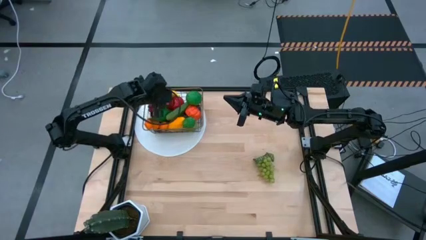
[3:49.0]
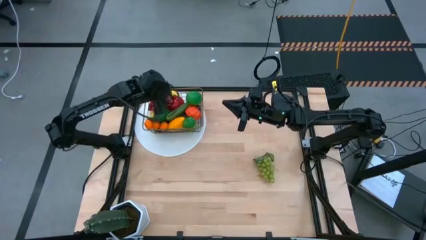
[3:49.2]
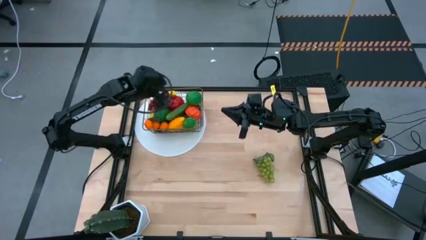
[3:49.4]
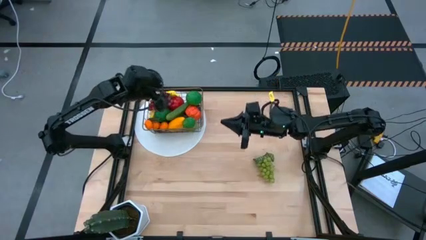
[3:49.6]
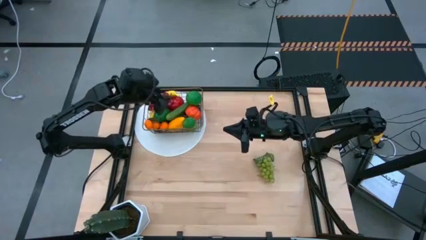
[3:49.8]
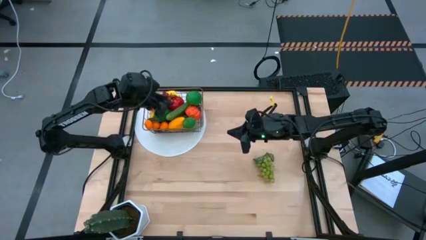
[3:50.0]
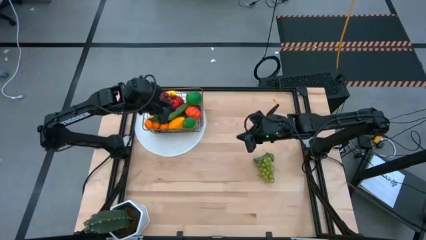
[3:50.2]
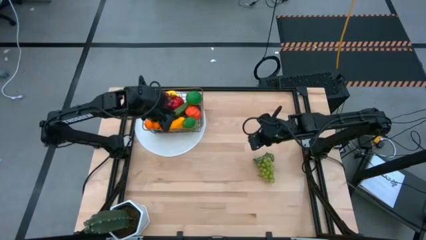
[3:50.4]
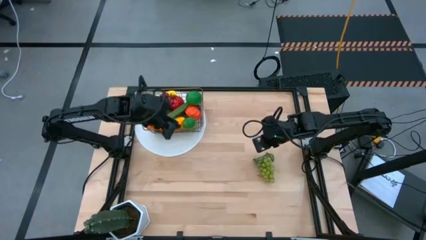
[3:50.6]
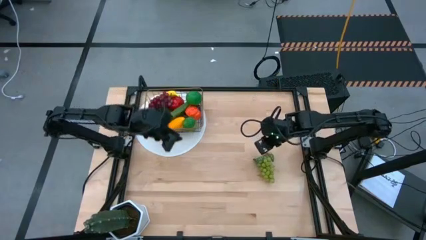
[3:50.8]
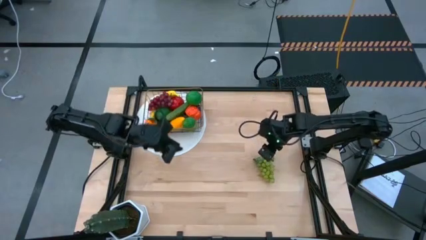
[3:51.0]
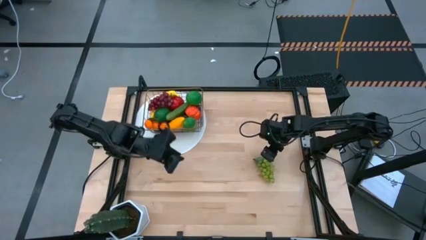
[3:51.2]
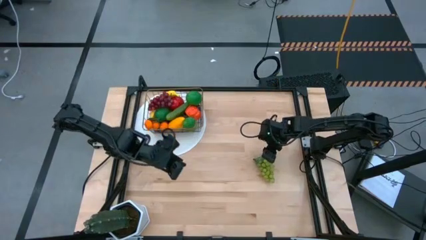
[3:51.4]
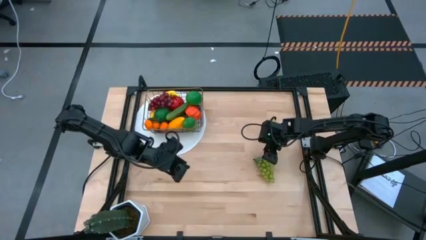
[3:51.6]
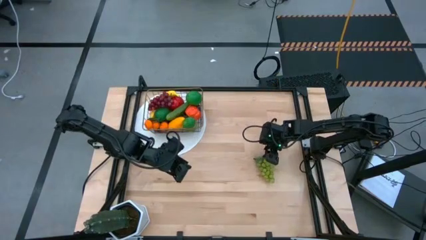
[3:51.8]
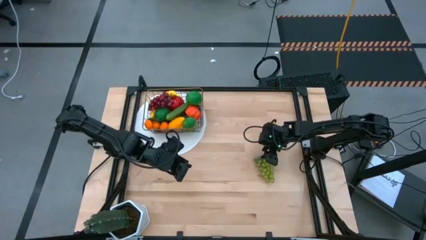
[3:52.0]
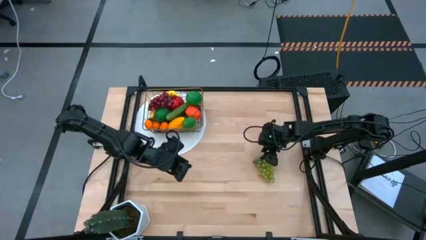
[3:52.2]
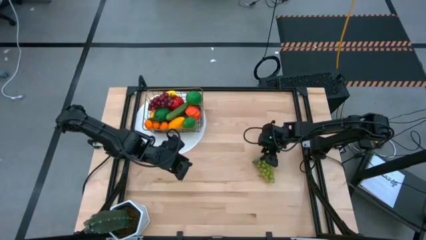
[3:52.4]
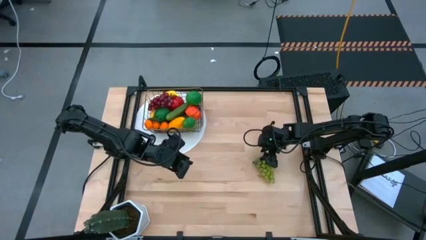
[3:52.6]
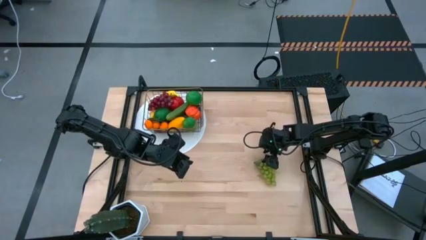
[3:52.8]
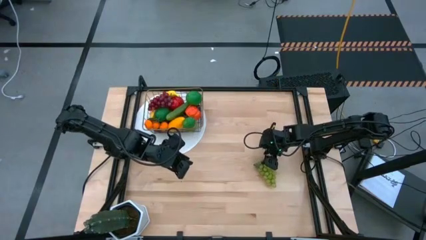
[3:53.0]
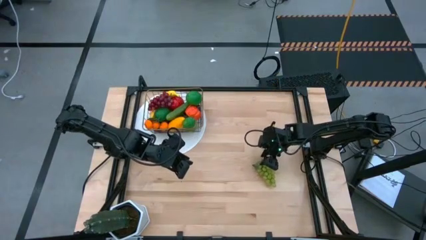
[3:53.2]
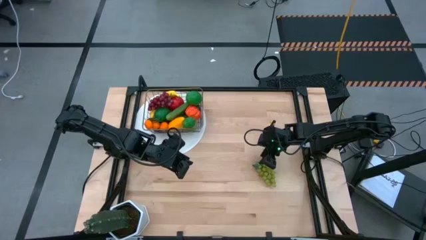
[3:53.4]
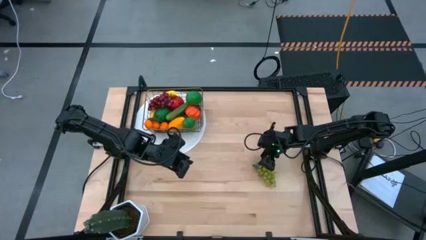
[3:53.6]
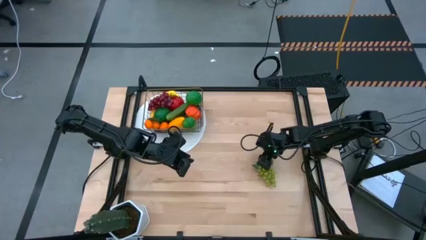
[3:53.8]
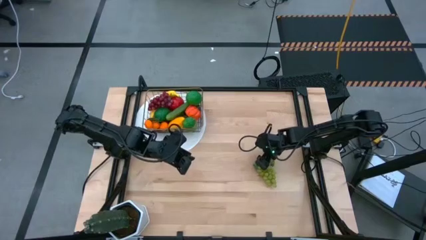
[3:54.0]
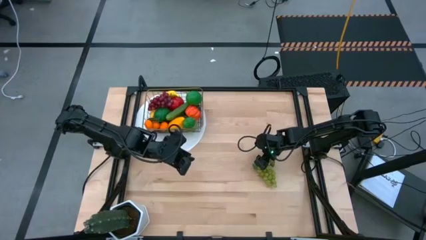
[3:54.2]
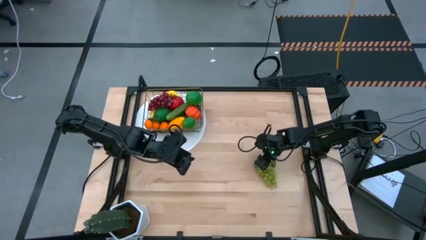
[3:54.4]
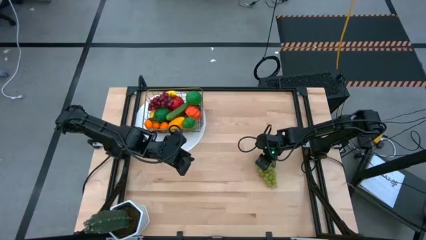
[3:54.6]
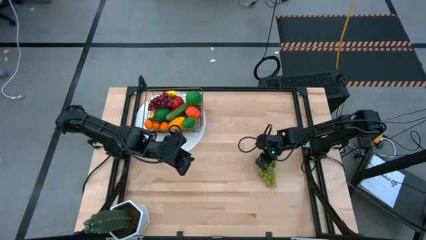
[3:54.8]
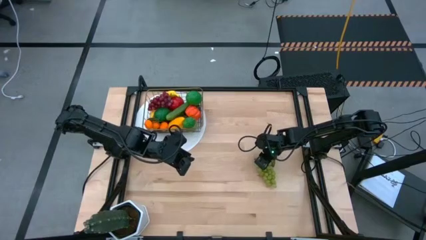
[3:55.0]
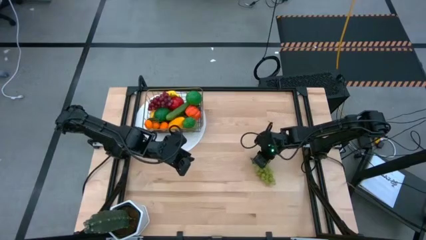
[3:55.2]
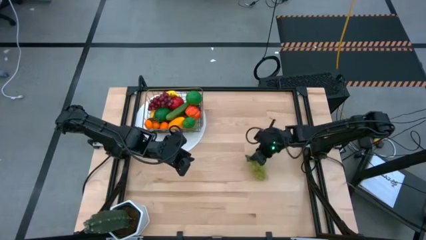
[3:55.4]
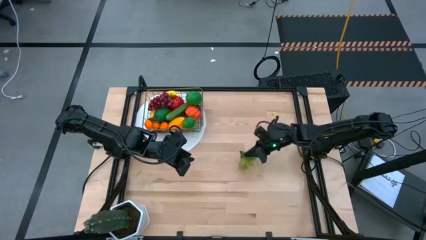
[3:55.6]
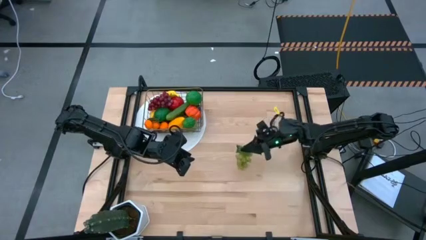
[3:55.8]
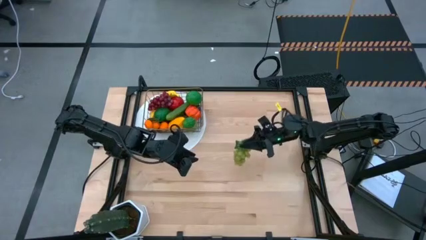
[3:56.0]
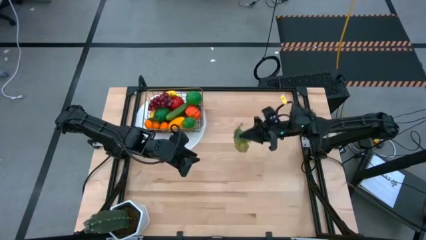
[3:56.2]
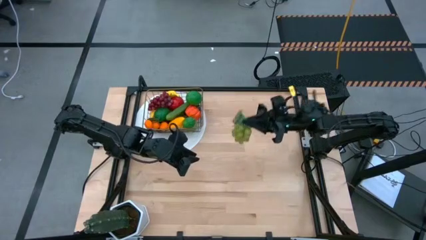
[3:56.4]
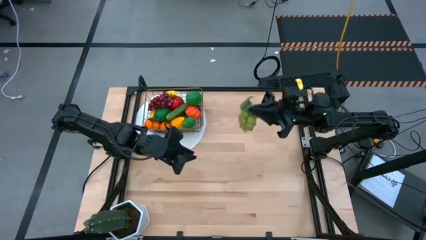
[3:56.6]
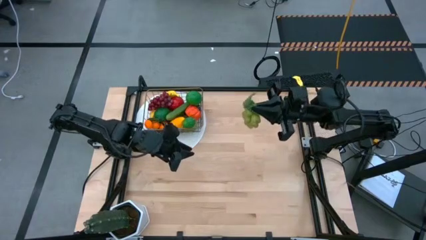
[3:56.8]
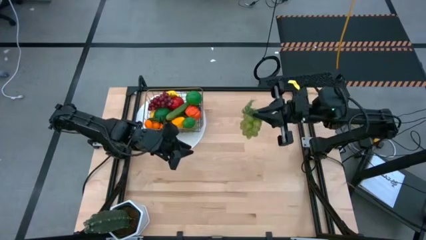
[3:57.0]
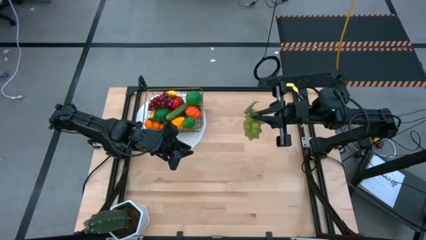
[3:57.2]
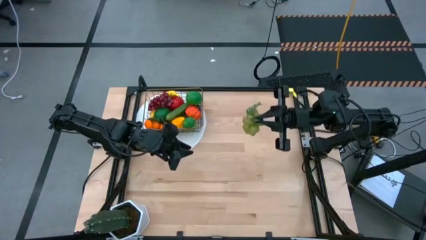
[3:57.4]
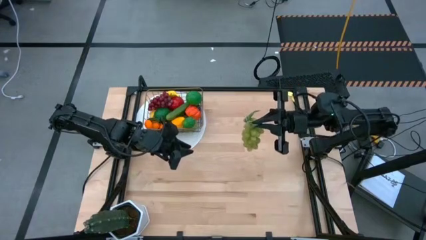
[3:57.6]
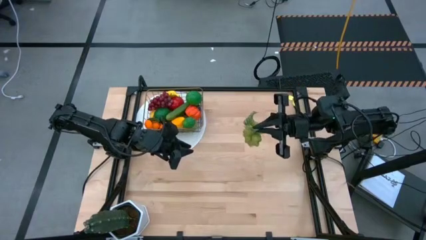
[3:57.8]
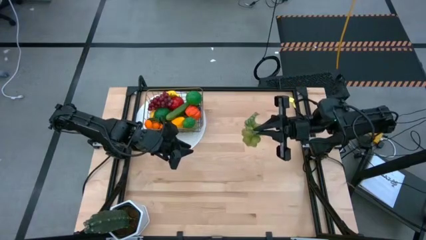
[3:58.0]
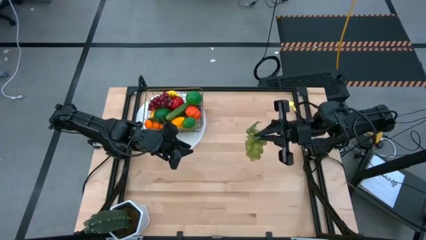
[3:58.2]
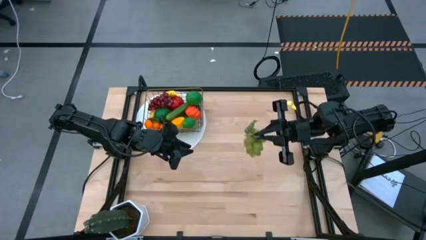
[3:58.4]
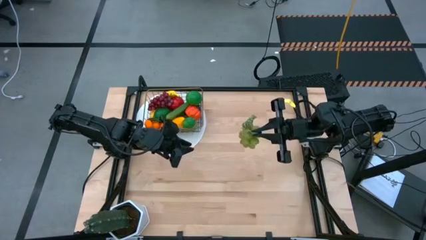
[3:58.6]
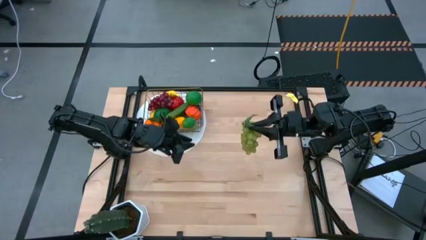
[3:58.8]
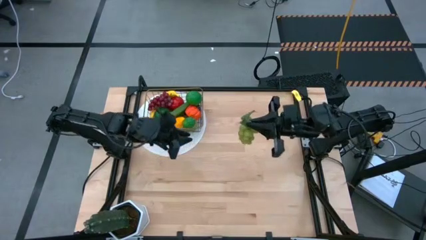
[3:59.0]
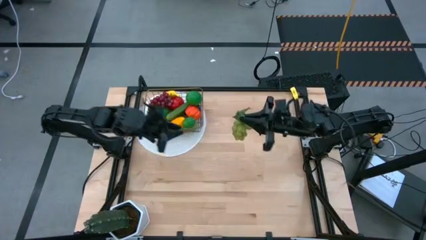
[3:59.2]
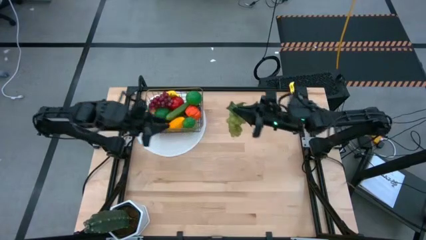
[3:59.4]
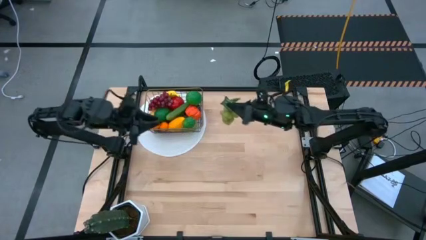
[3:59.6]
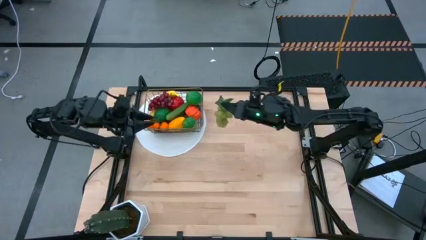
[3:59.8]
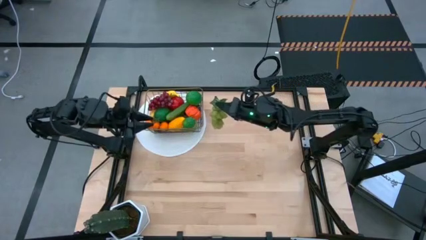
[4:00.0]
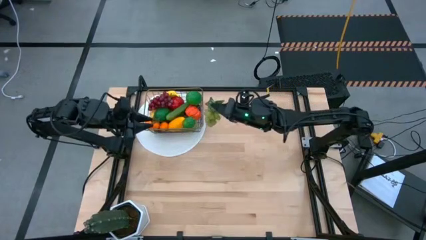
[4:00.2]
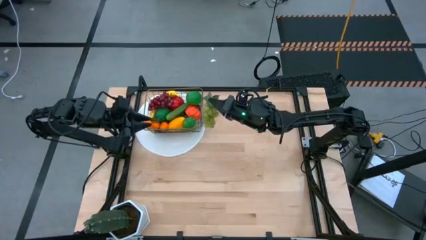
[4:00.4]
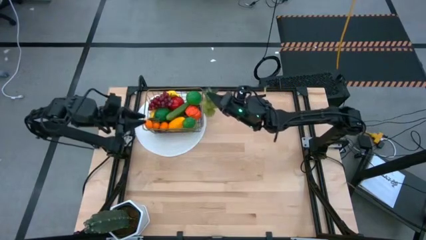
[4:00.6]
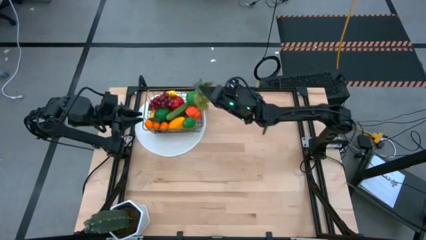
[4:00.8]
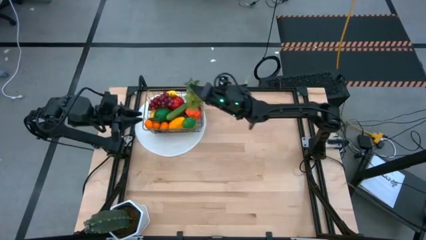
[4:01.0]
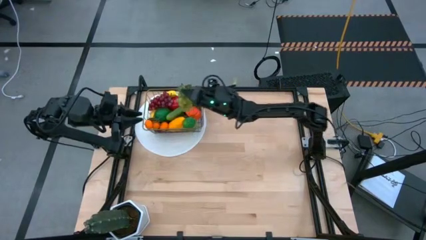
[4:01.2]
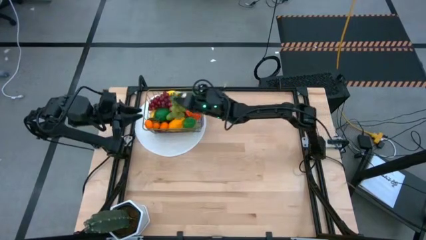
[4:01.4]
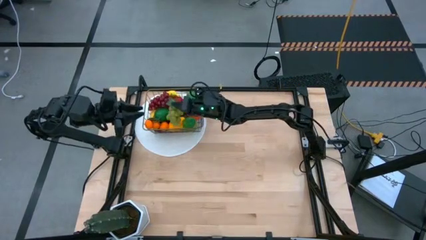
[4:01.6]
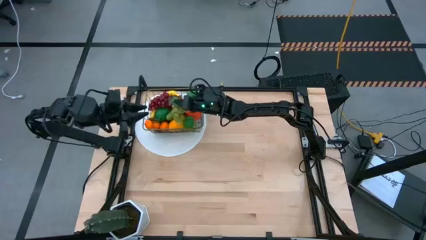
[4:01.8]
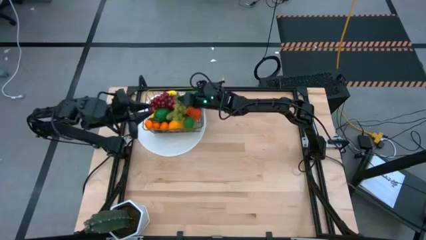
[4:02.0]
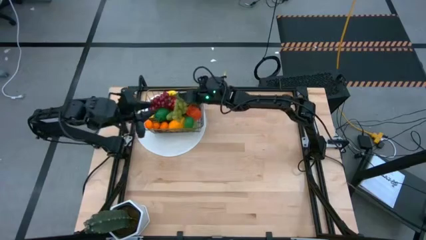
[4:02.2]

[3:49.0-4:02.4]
Task: Build produce basket
Put the green grapes into the wired basket

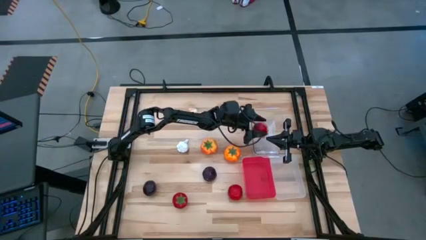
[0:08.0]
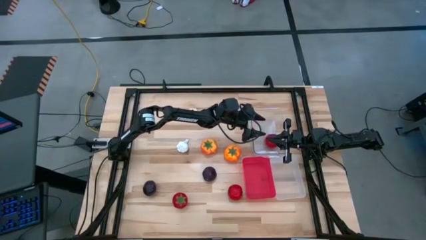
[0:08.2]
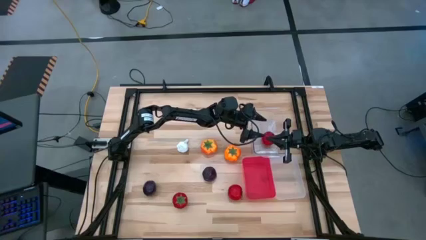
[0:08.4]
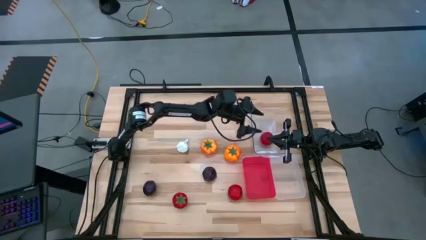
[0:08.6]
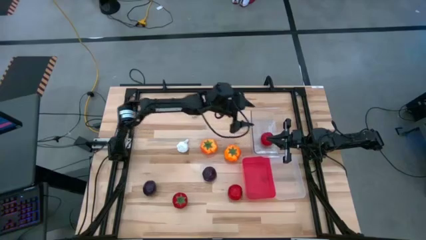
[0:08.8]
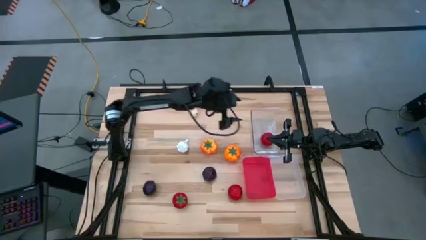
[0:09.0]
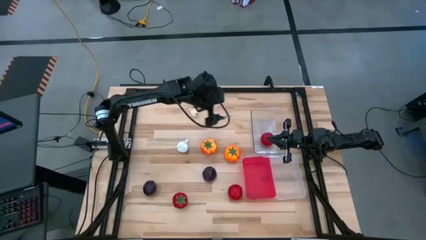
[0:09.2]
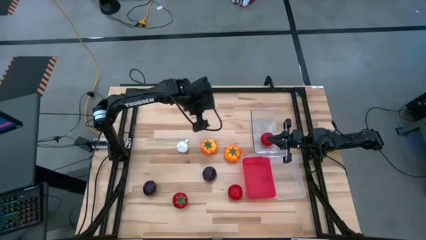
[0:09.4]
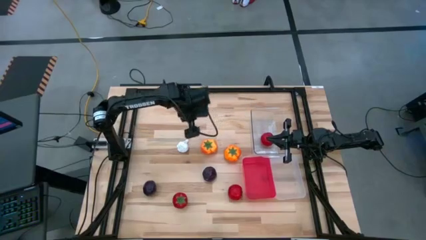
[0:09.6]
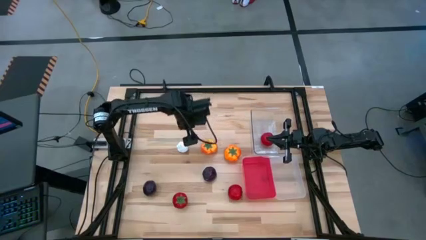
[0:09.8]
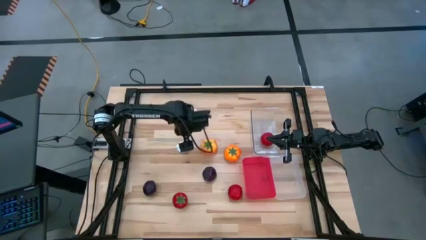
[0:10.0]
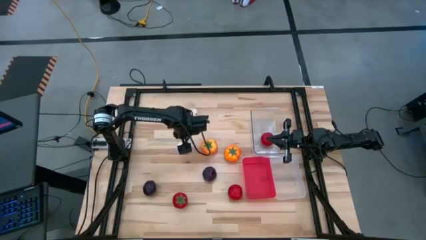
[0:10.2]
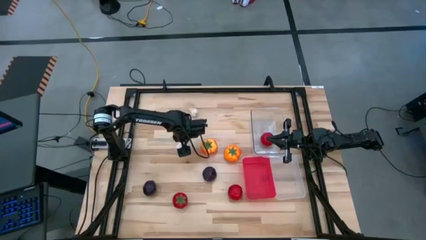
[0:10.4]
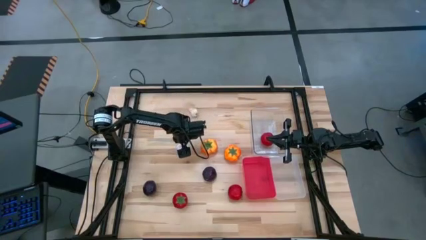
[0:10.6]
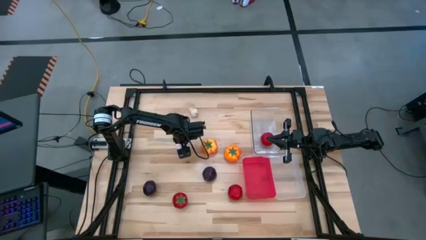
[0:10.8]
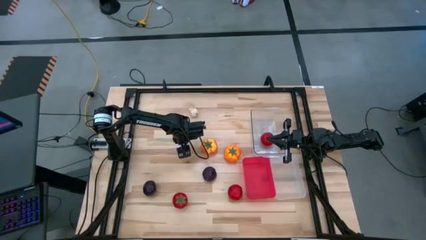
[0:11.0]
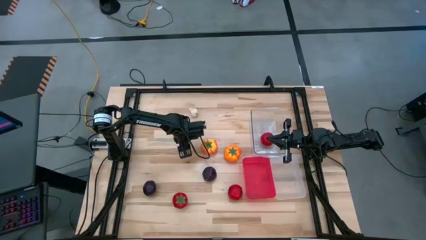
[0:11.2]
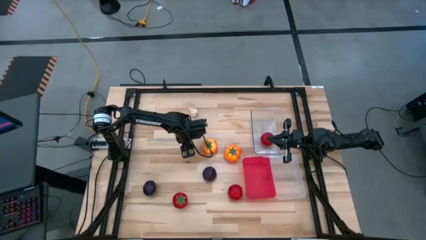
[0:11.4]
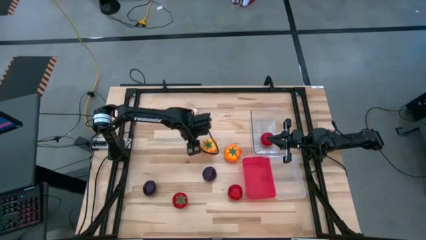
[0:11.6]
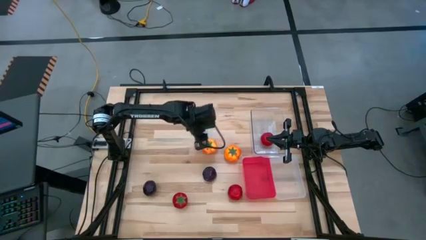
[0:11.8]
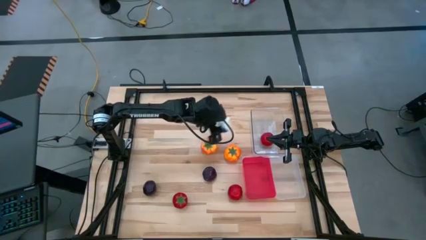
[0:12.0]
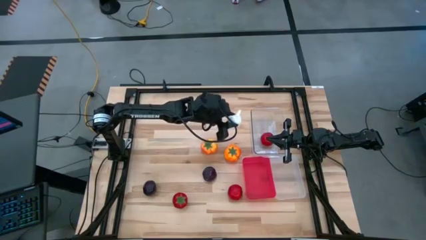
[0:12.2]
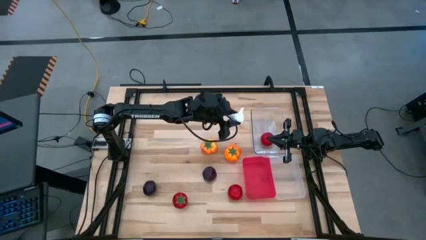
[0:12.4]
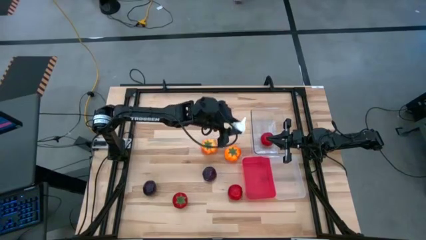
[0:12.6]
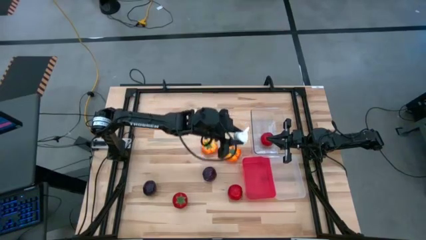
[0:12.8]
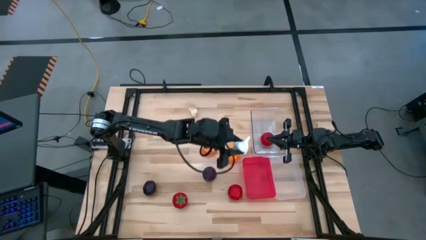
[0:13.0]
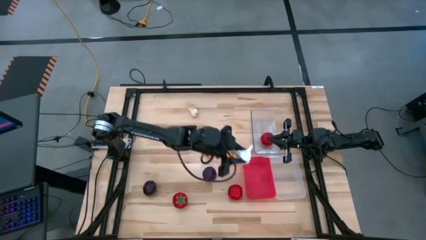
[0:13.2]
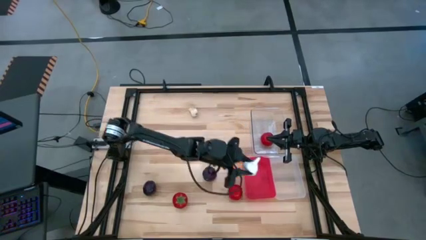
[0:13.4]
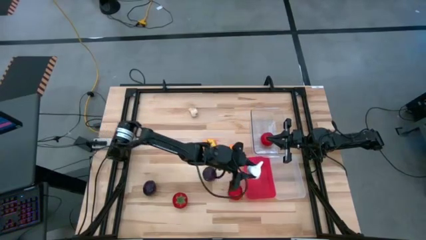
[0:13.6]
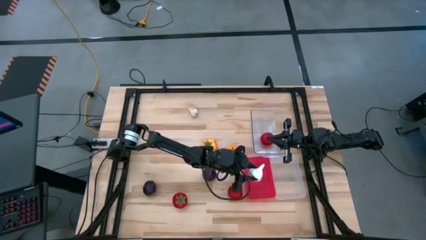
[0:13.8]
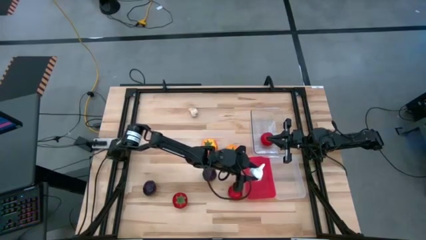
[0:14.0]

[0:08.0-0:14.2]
Task: Sort produce into baskets
Put the bottom garlic into the red bin
